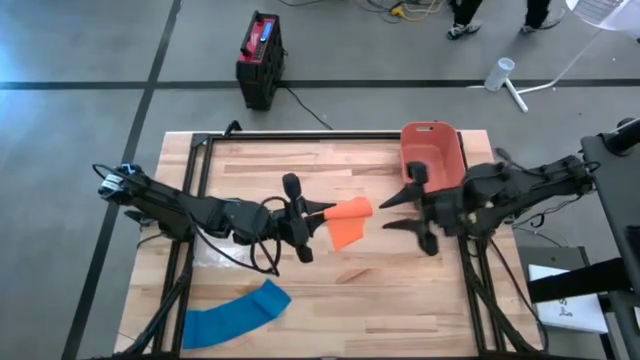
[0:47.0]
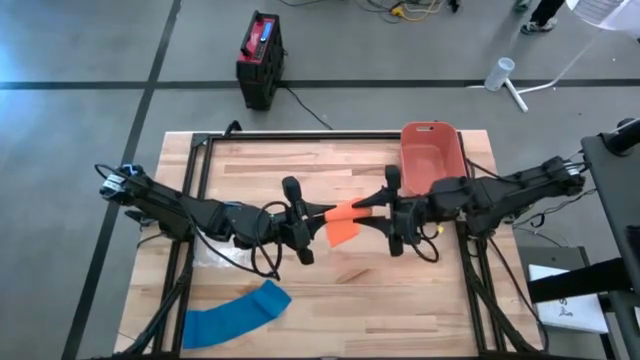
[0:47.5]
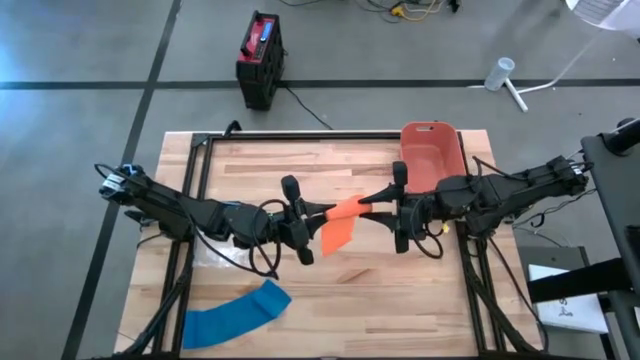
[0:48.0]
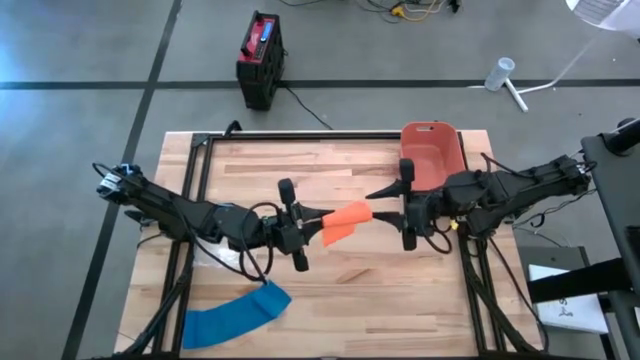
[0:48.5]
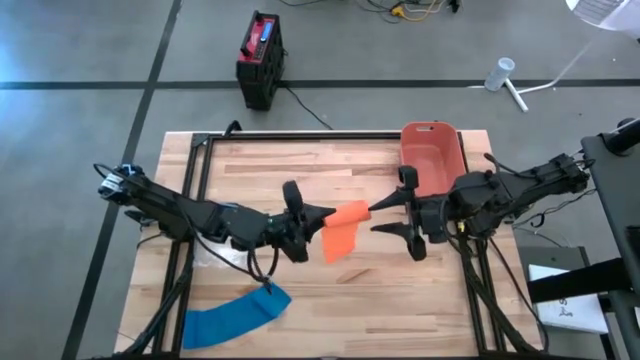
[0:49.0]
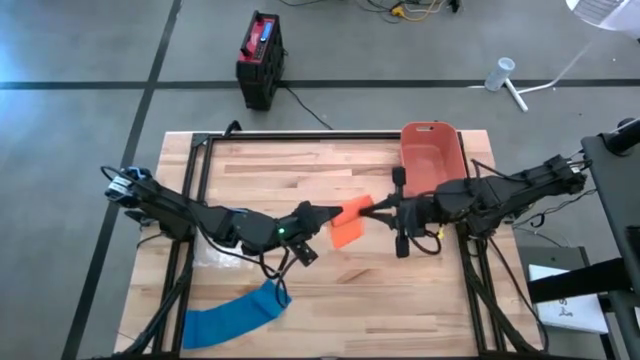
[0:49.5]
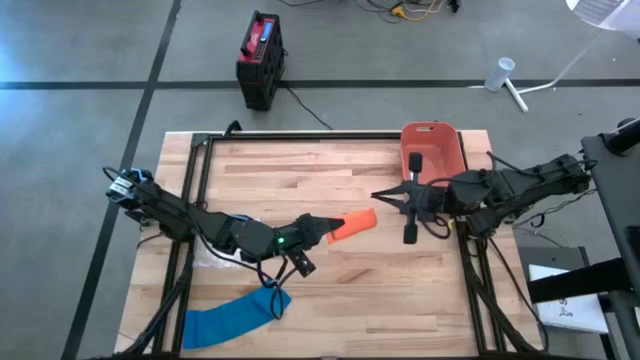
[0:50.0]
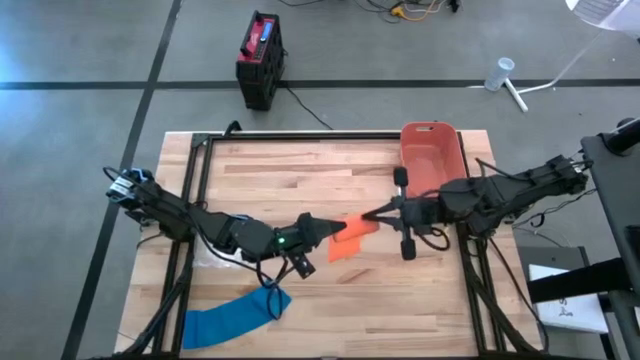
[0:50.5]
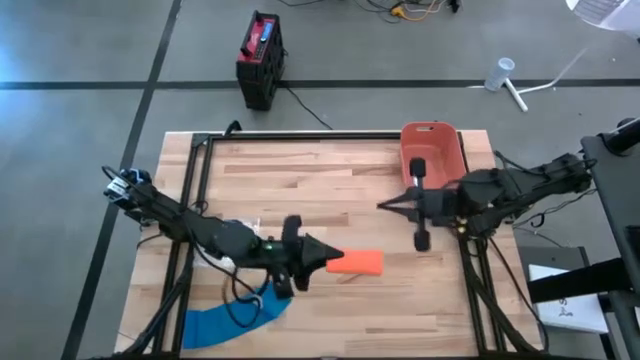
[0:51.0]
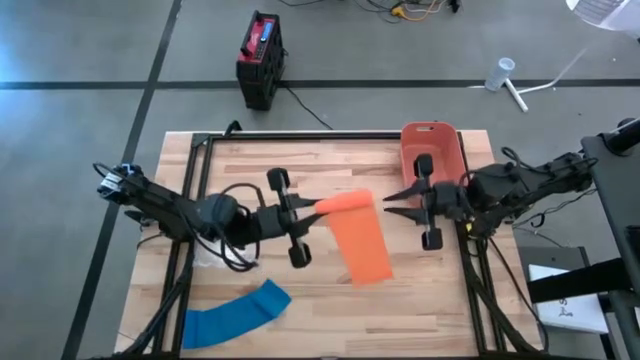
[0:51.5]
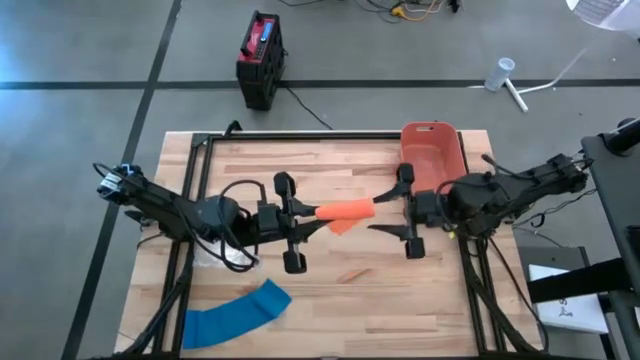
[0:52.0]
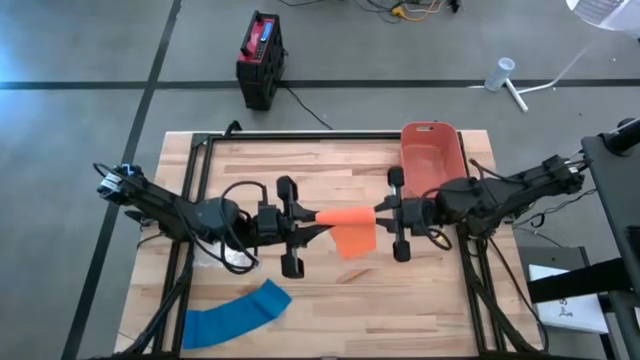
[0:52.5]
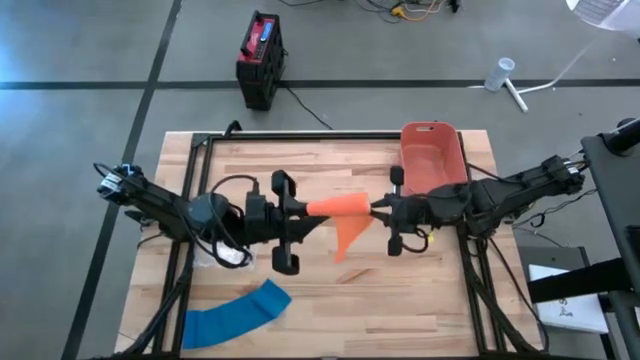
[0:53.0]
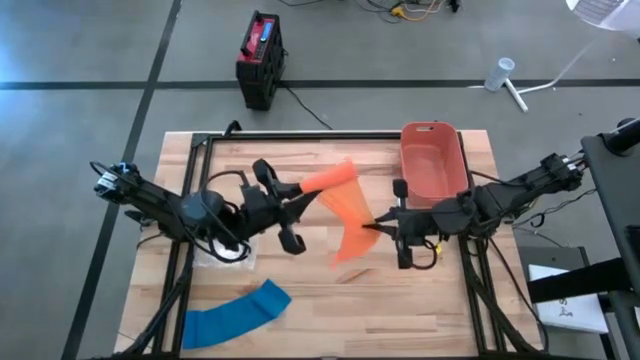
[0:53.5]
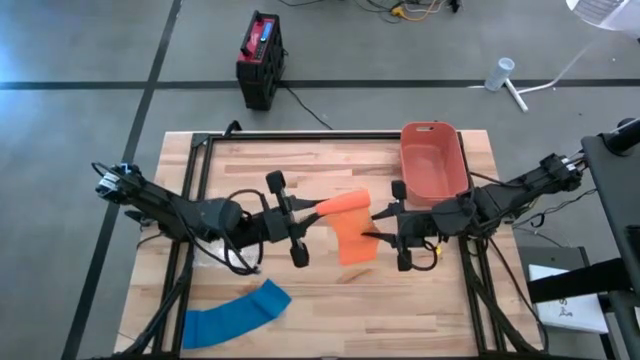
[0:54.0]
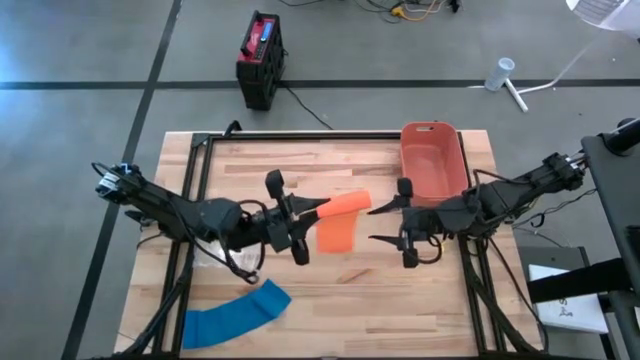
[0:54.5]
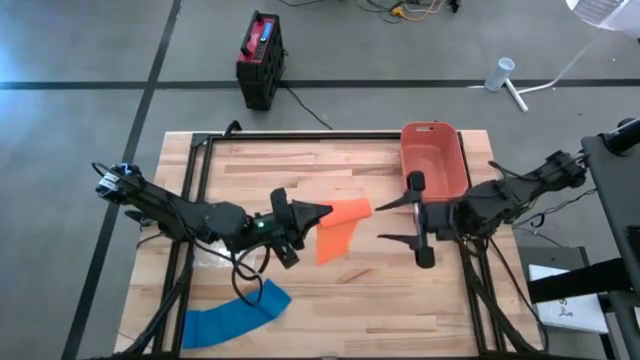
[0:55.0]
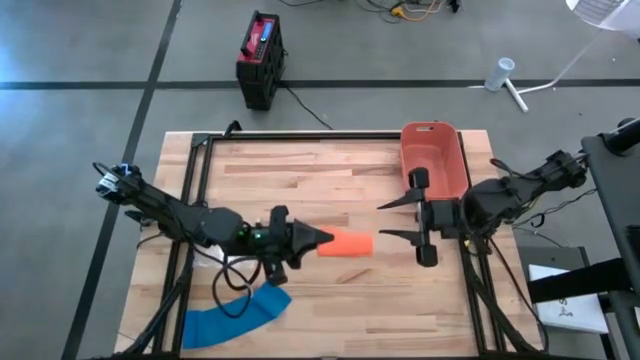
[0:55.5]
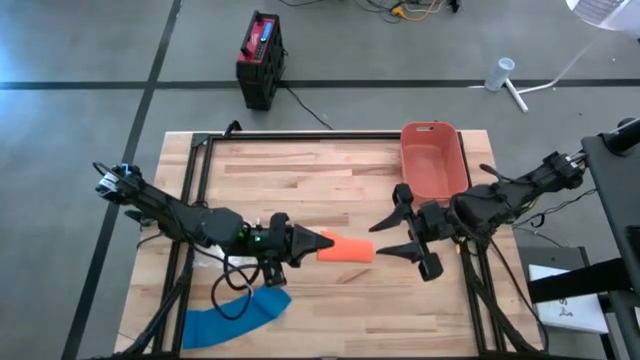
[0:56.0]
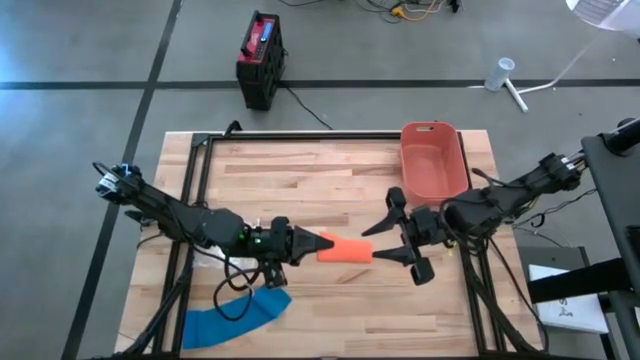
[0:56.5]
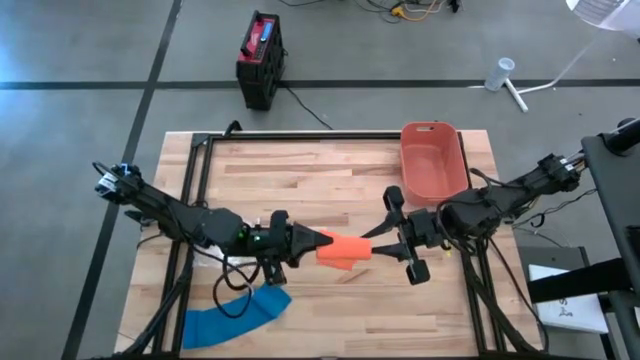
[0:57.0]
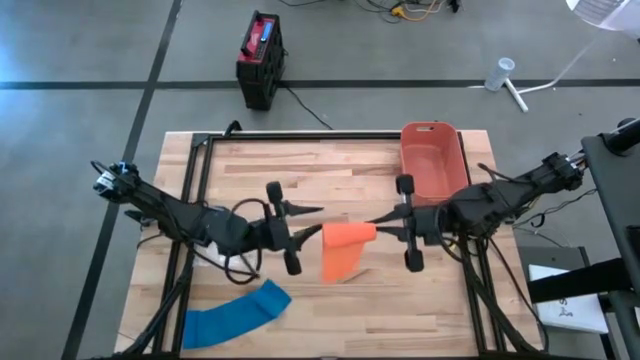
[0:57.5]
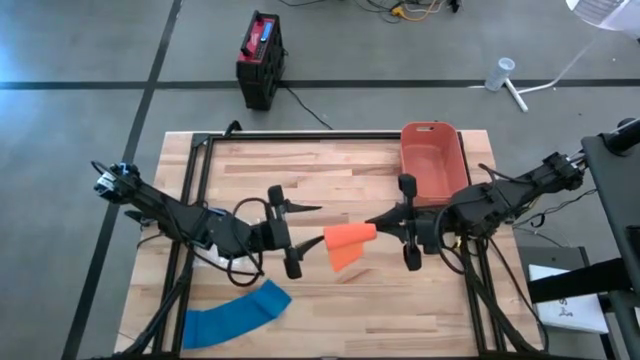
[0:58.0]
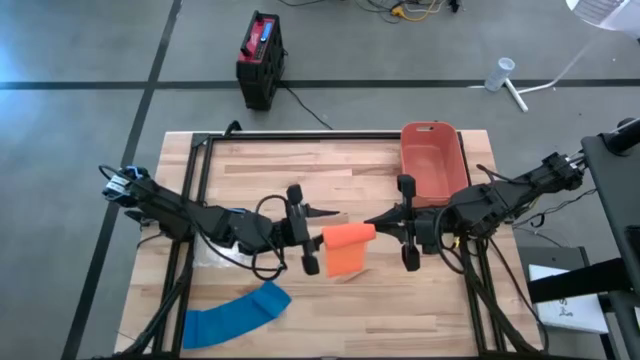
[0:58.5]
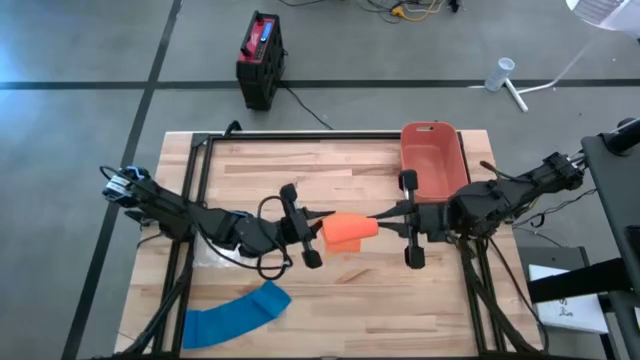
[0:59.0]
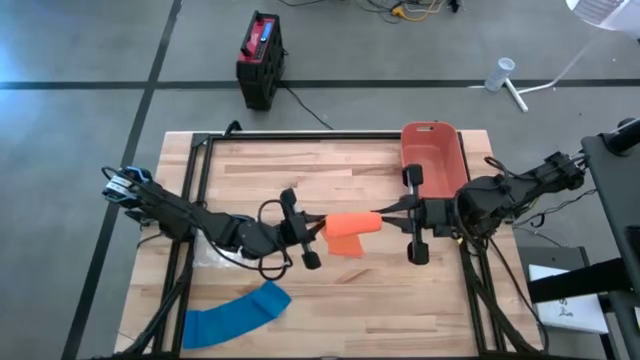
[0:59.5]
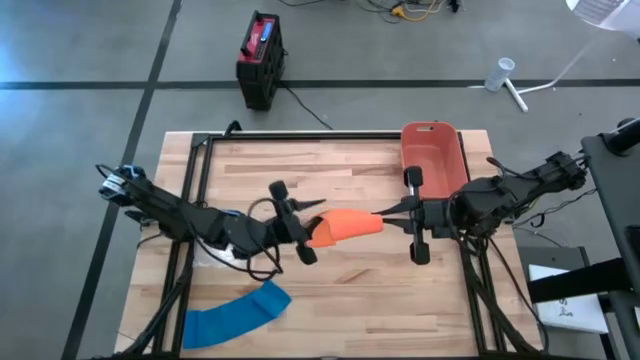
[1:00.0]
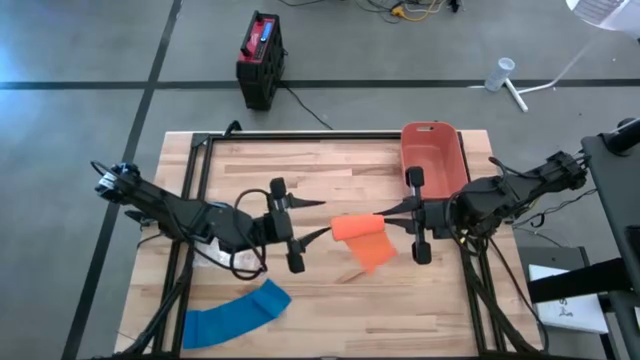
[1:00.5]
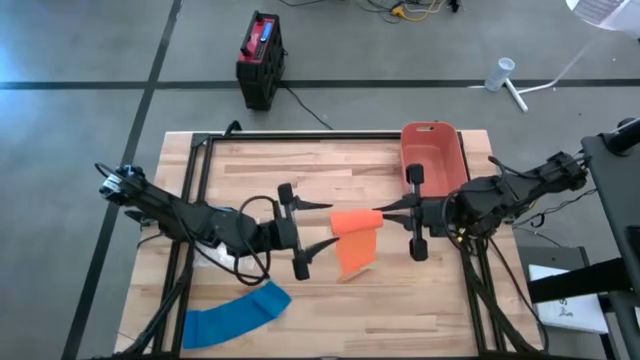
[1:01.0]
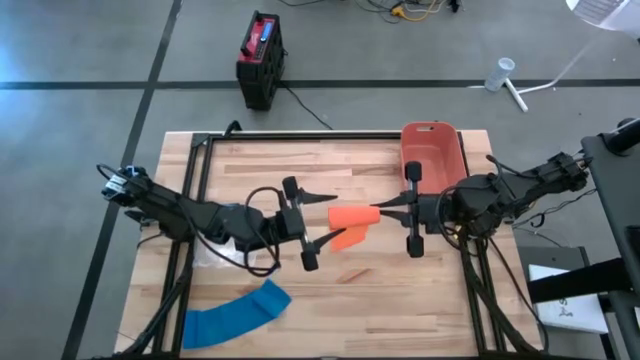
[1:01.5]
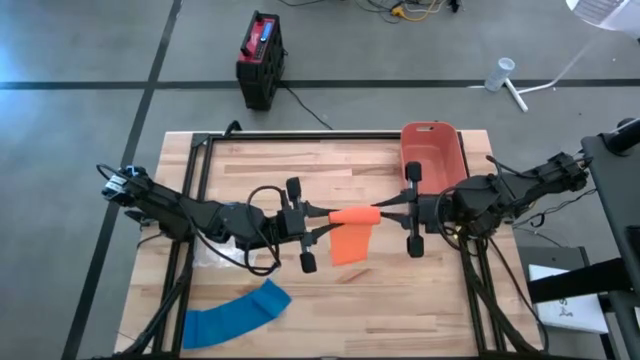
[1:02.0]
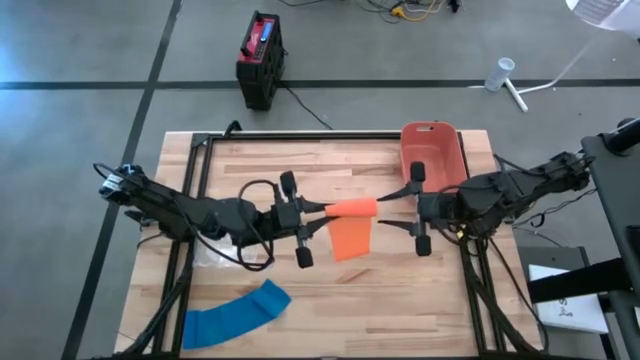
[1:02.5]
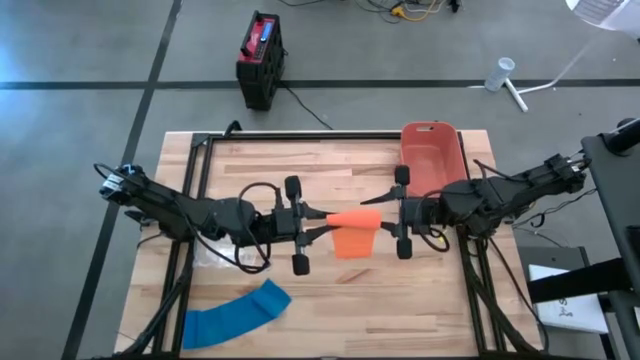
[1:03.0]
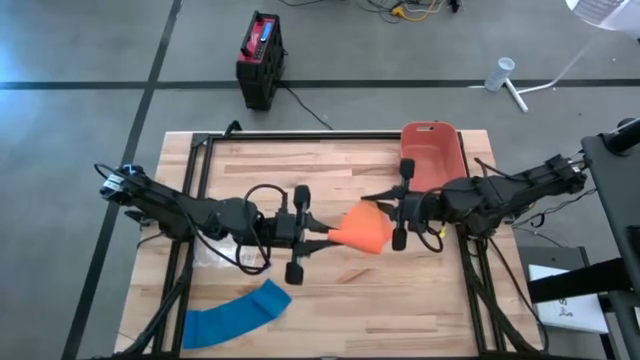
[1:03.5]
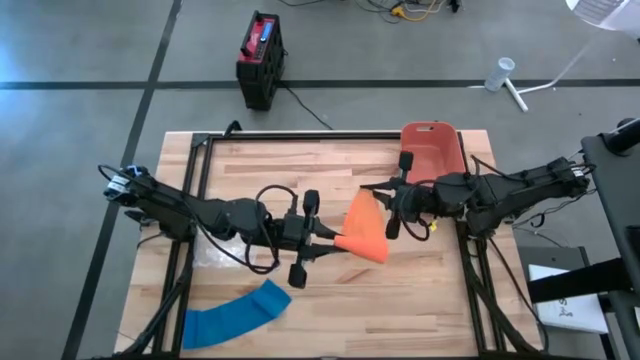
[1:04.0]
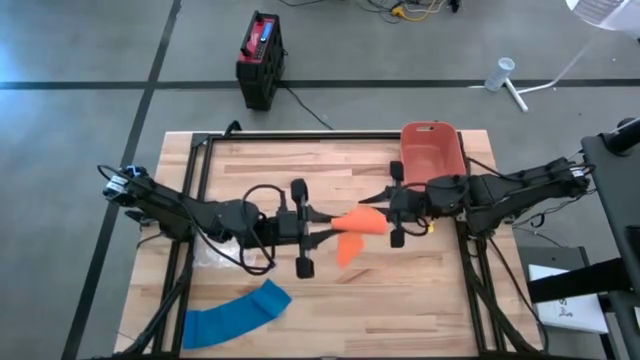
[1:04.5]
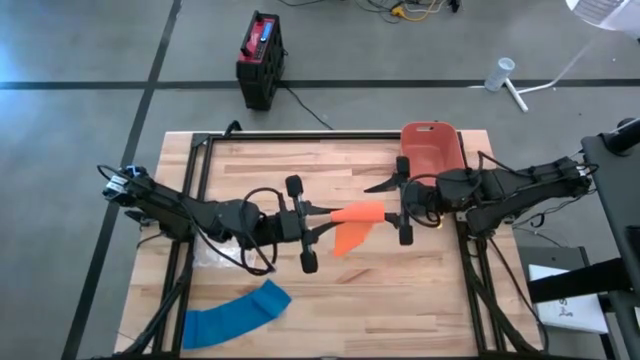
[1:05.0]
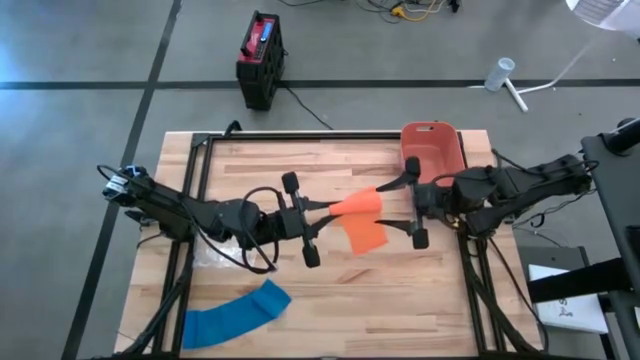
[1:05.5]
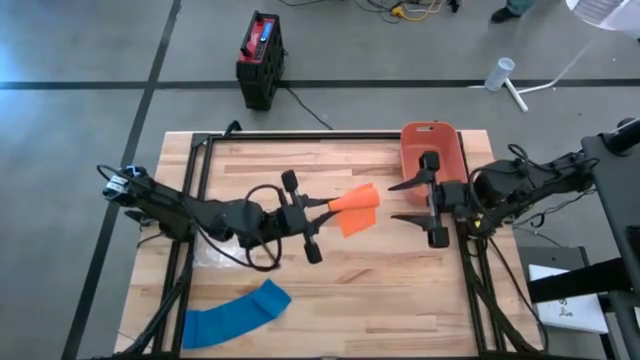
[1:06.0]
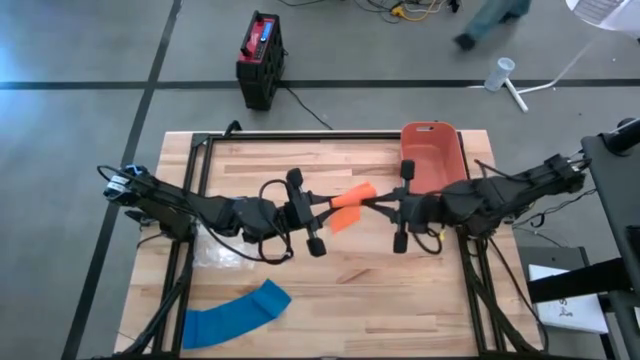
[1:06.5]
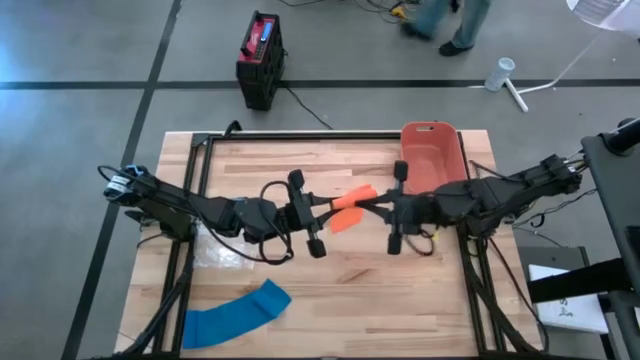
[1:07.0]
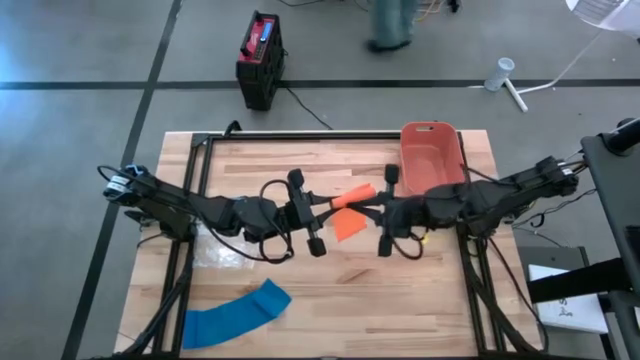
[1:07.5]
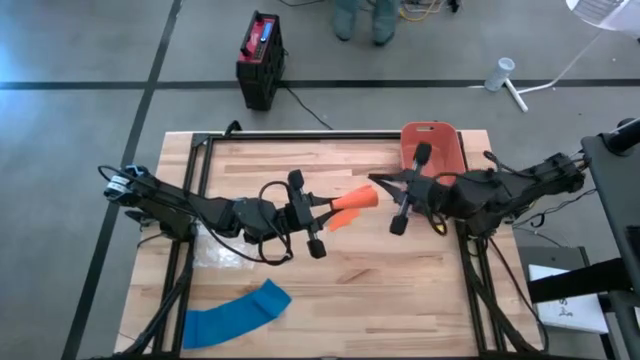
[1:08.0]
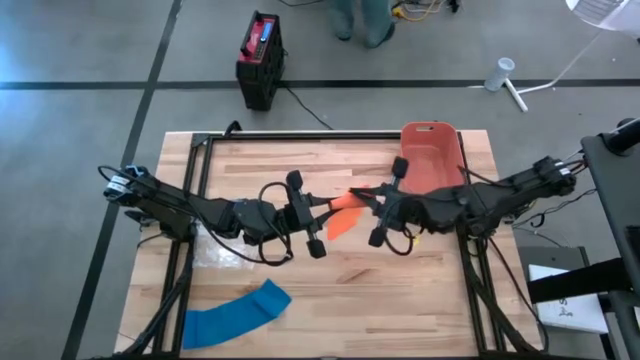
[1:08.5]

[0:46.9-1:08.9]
Task: Roll bandage
Roll the orange bandage
